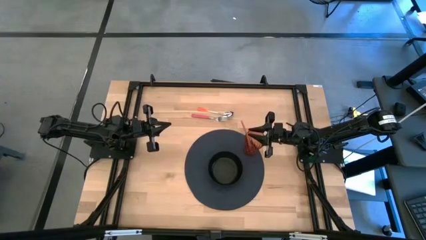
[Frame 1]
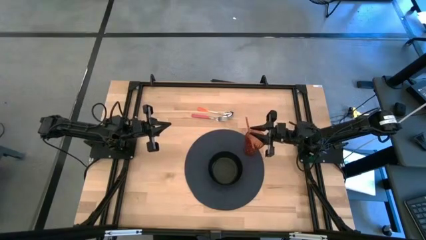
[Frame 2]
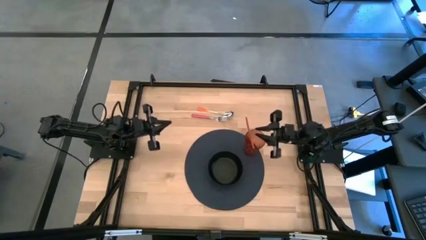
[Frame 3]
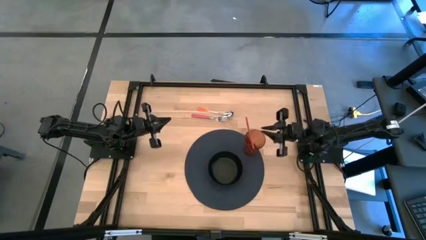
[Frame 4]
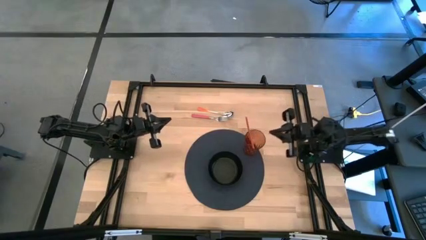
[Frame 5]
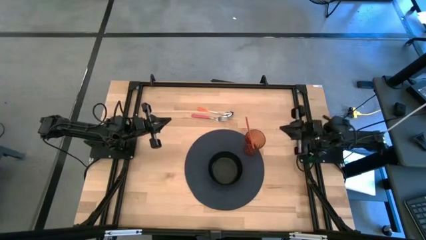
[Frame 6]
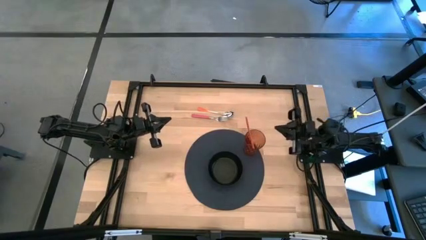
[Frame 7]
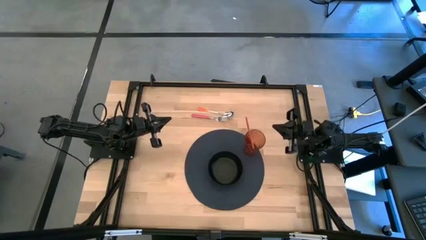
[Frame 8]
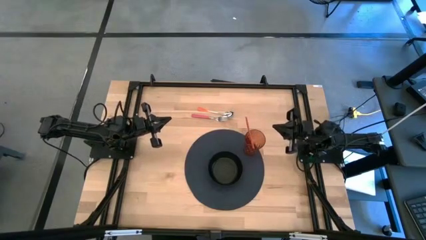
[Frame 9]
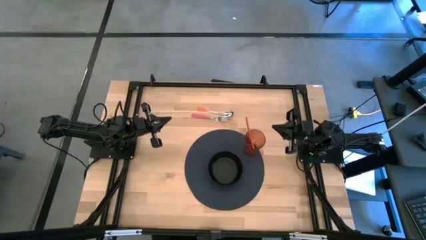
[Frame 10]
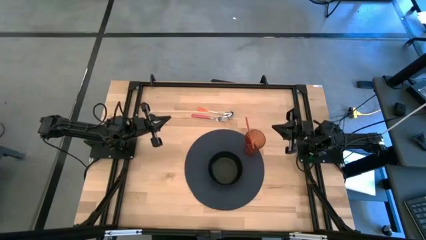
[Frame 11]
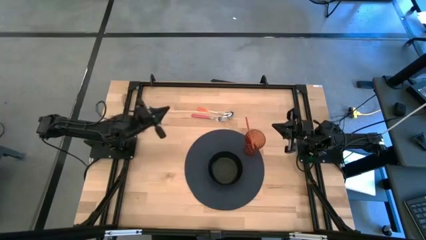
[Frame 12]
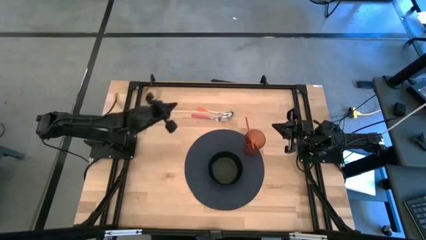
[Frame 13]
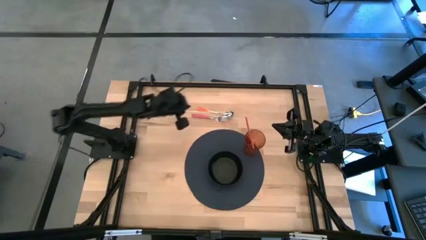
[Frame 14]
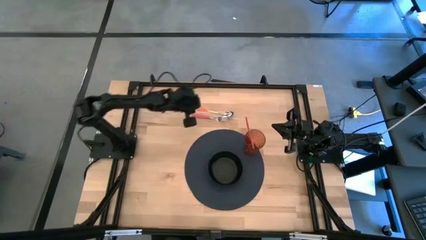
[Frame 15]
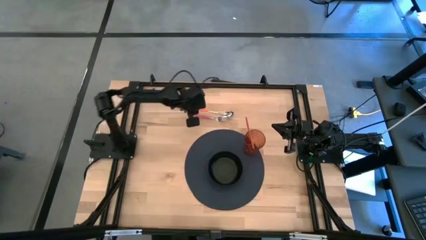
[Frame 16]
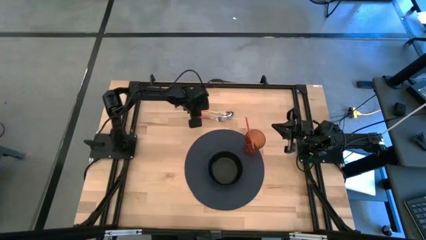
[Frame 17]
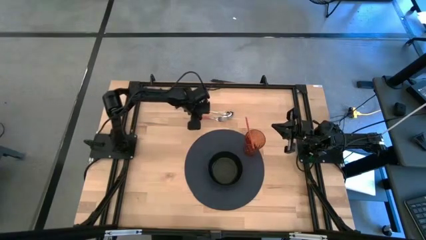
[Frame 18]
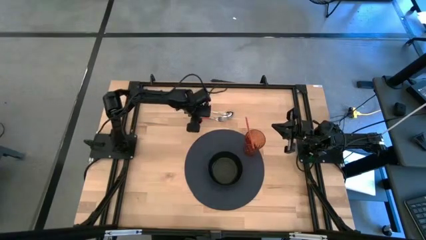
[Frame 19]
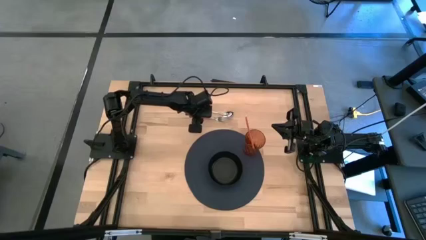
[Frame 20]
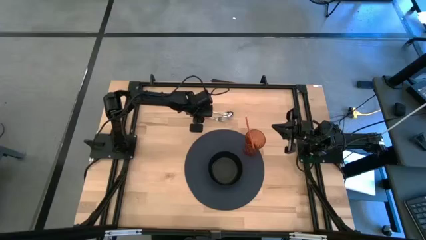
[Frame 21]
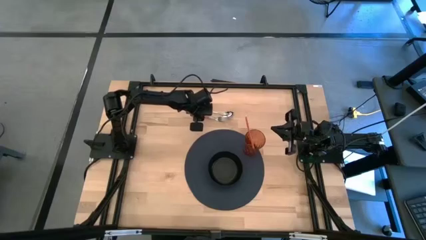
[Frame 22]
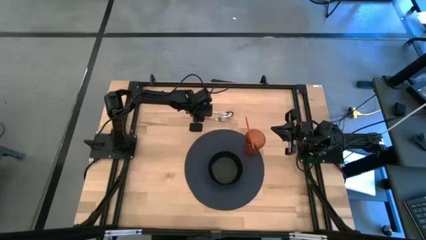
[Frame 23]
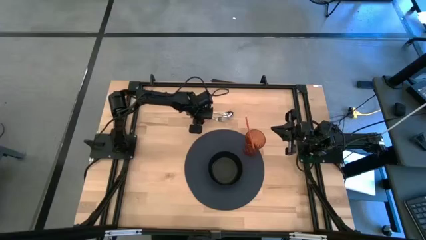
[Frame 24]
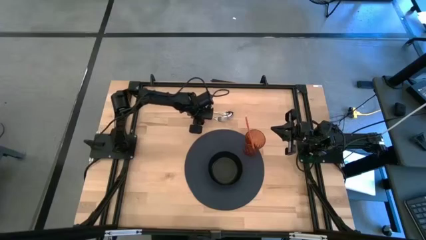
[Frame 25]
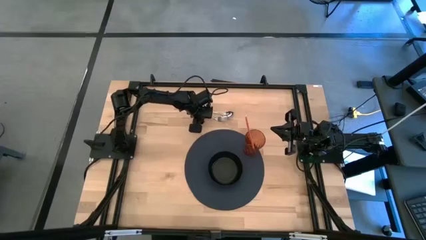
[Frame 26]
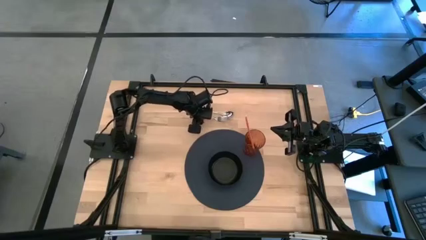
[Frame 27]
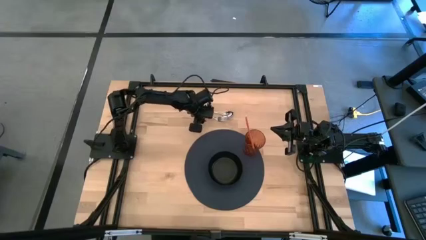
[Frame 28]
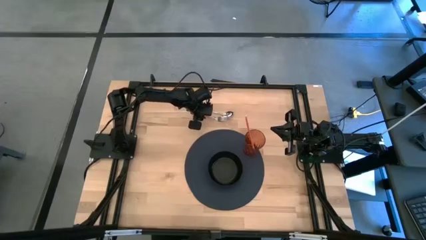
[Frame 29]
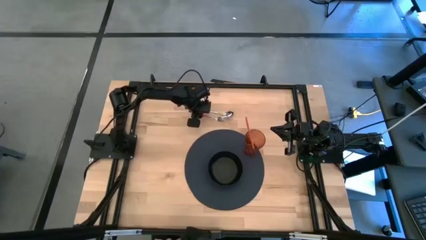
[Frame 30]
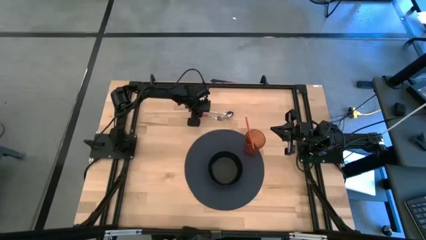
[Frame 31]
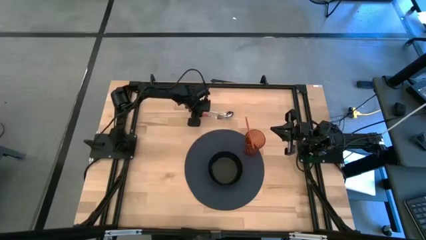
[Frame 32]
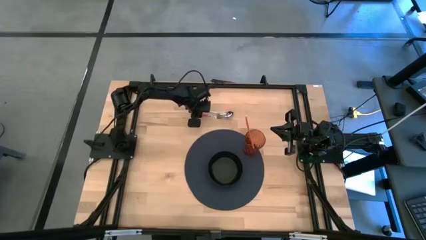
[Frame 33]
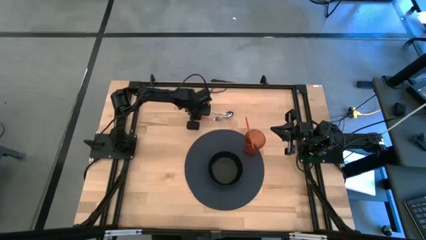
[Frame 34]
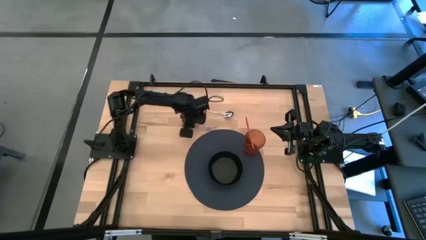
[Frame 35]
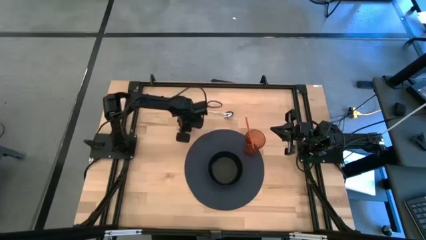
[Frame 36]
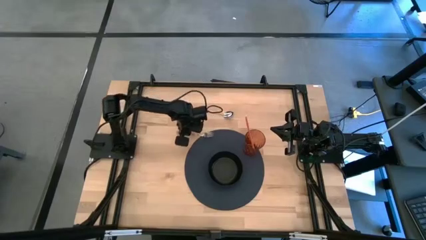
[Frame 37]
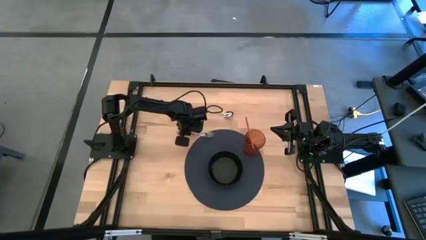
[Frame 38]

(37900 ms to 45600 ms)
Task: Pick & Place Utensil
Put the pink fork into the black bowl

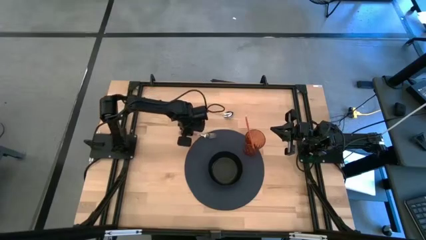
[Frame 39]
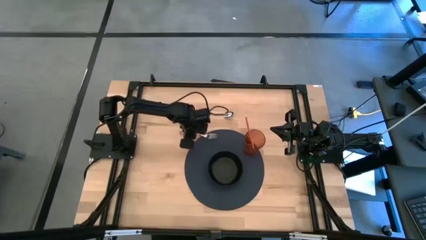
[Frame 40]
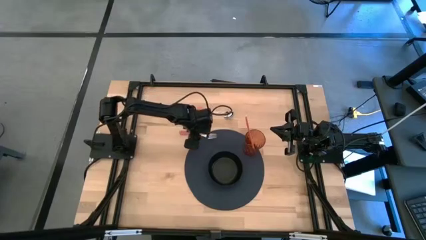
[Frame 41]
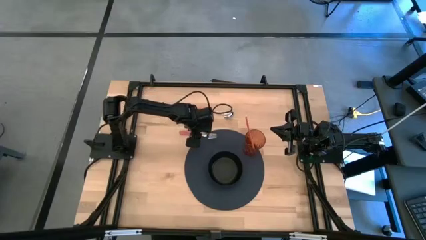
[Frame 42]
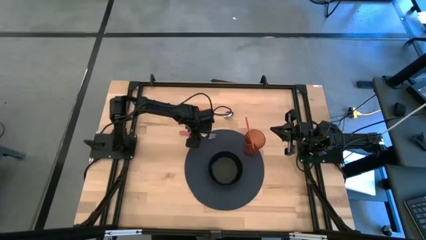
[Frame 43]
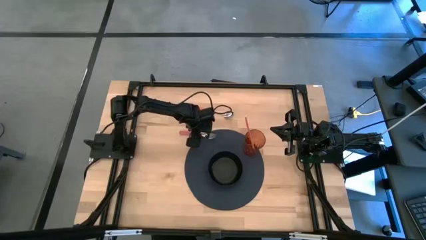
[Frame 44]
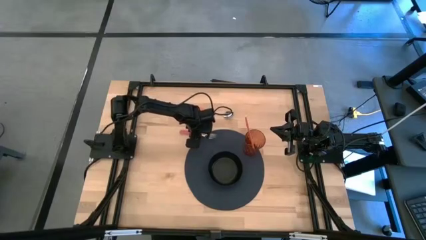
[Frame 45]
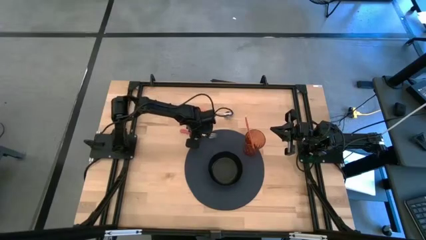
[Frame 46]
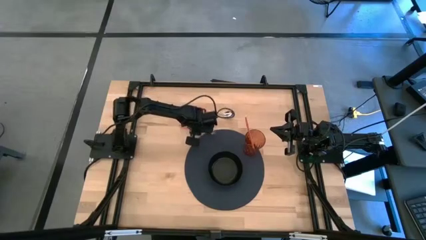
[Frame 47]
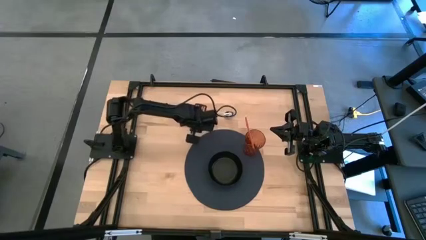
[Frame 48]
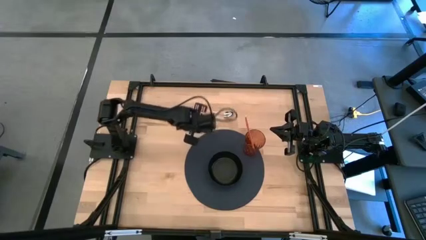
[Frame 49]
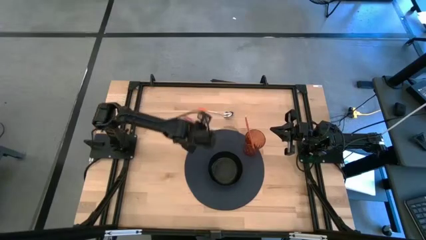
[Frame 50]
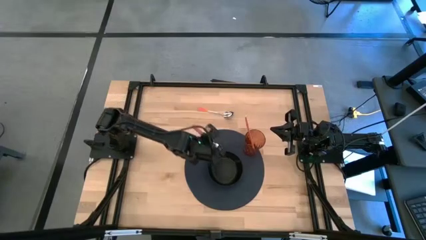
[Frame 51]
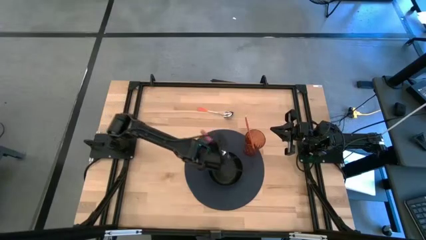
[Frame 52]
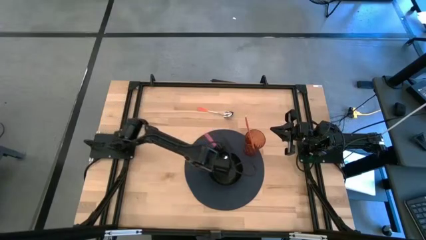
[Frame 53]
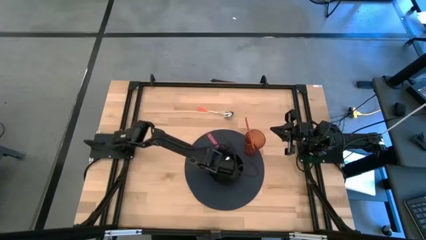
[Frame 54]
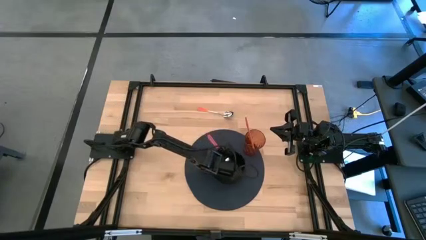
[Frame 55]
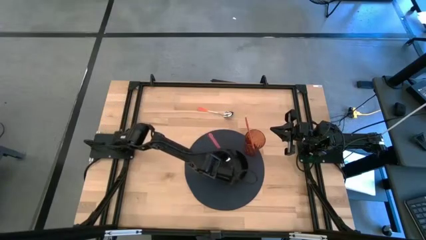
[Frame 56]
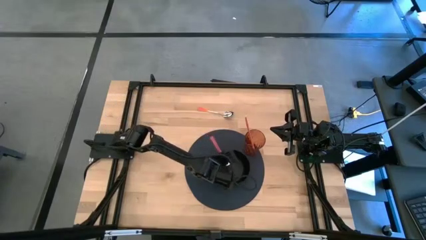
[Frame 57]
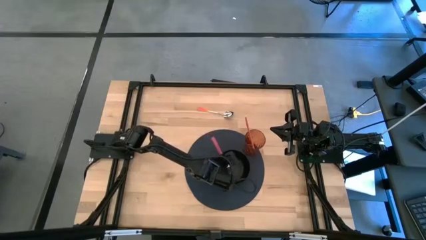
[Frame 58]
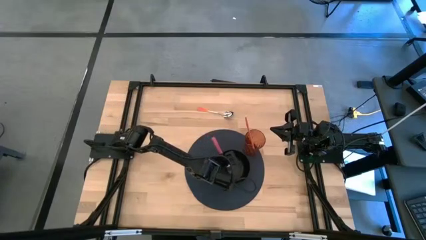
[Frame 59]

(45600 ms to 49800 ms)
Put the pink fork into the black bowl

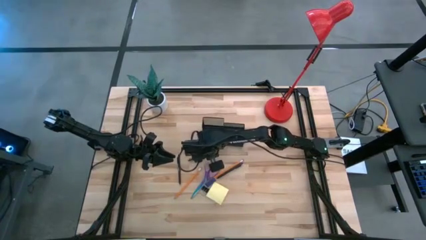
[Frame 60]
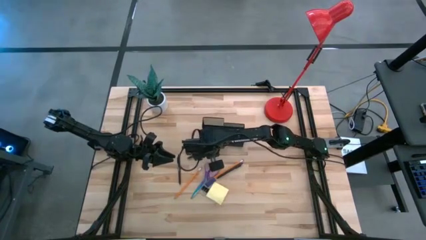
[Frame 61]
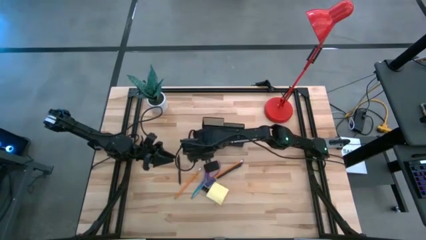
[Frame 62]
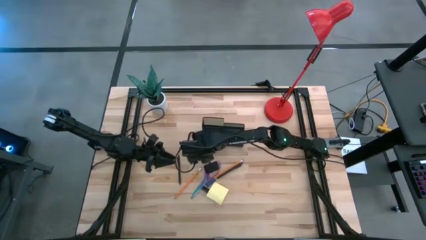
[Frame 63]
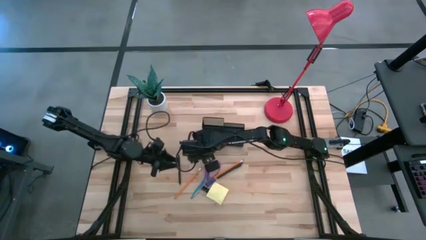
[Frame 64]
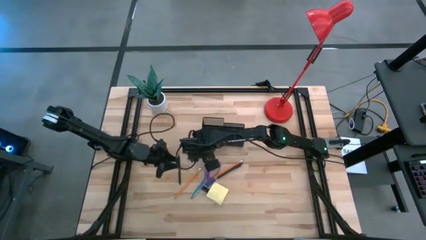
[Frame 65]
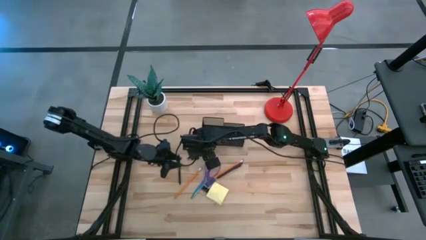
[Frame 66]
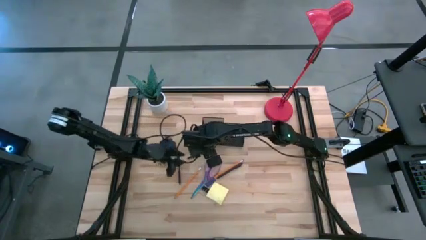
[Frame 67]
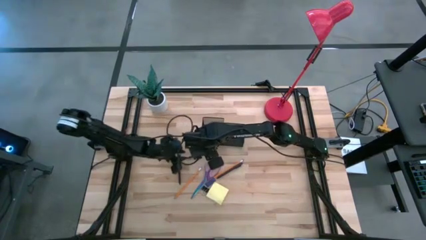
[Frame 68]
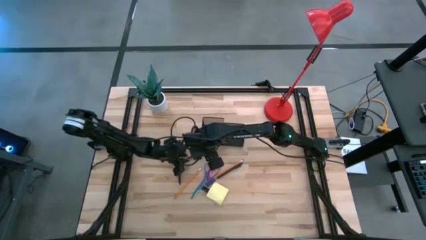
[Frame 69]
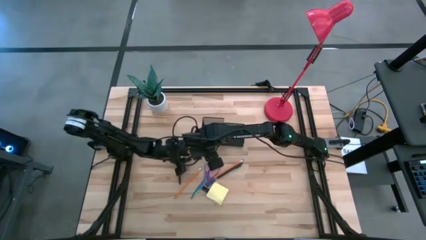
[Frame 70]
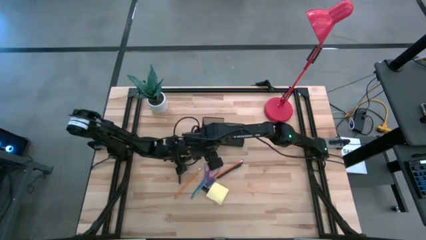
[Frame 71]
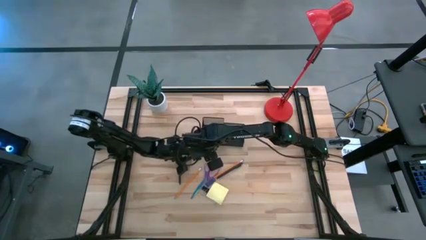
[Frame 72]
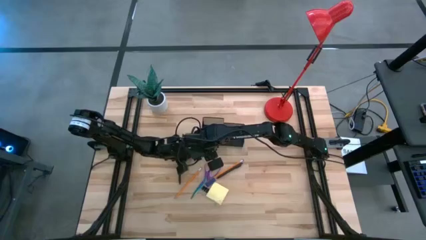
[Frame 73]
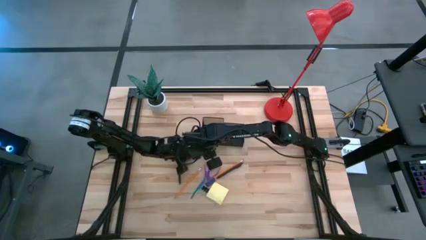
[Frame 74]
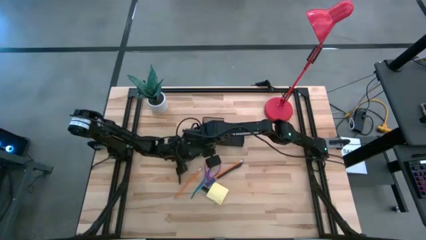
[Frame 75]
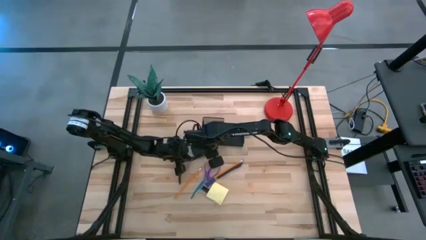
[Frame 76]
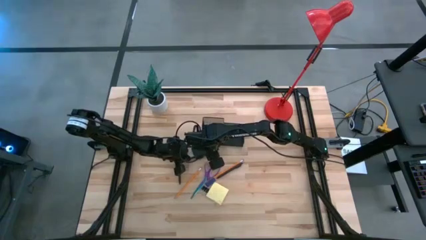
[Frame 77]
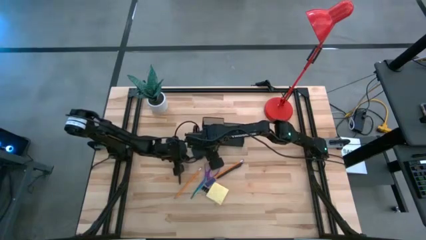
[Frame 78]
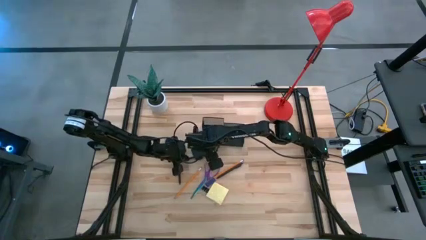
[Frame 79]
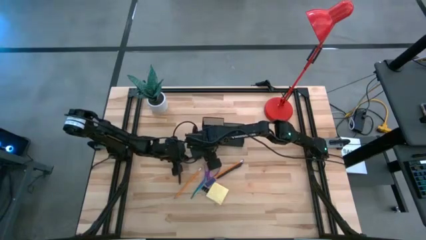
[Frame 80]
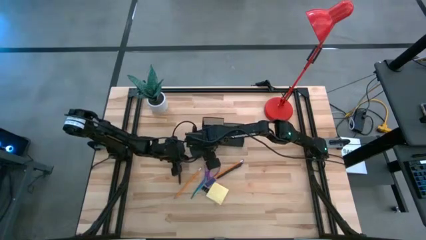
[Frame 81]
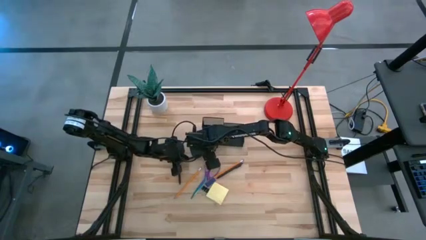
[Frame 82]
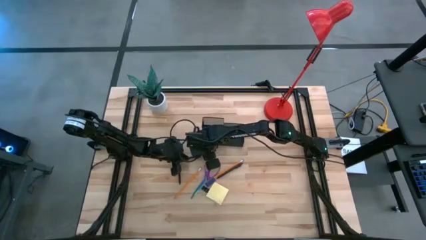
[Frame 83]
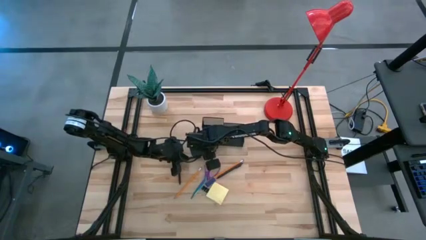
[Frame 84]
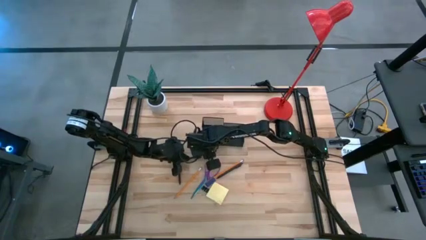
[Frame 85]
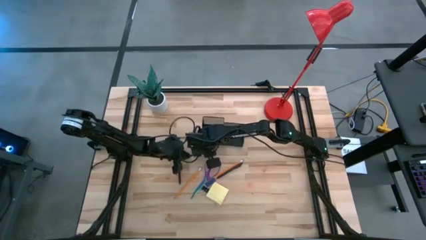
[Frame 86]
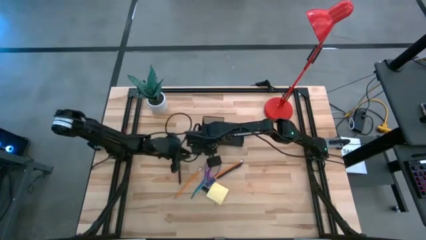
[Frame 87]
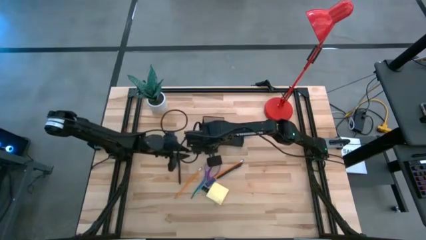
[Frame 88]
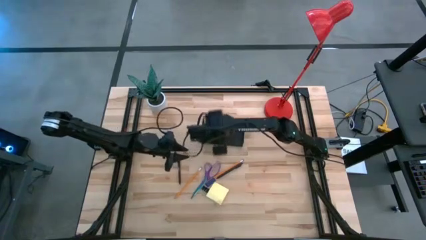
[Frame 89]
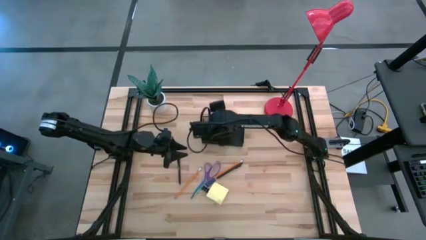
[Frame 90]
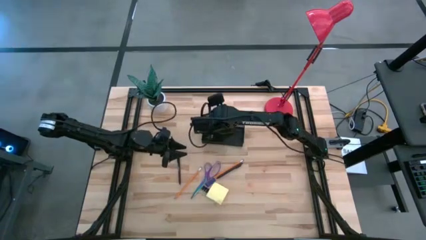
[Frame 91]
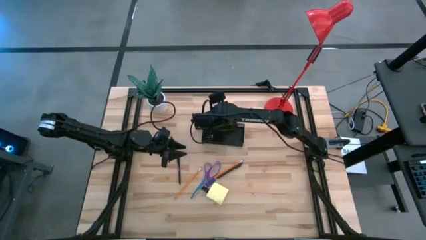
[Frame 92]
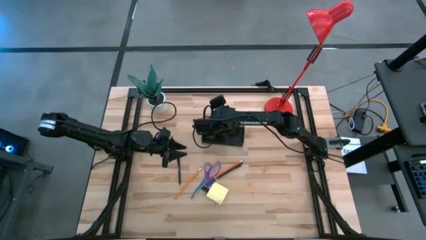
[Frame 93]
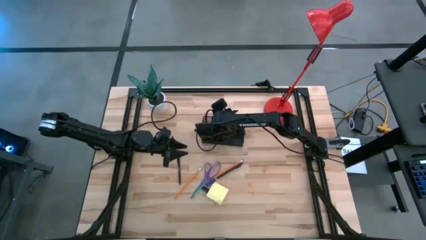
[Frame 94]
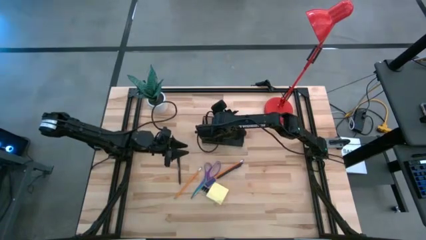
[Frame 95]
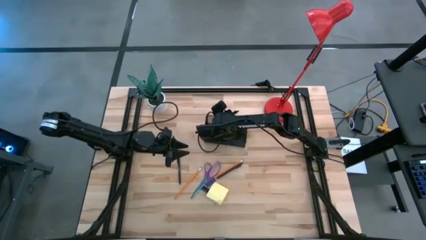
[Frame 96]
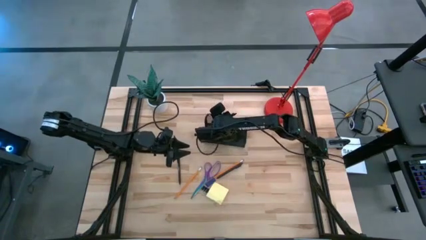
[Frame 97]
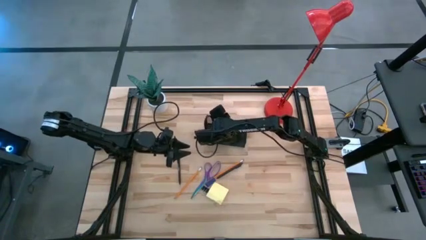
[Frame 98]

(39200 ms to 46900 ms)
Task: Pick and place office supplies into organizer
Put the middle black pen into the black desk organizer
